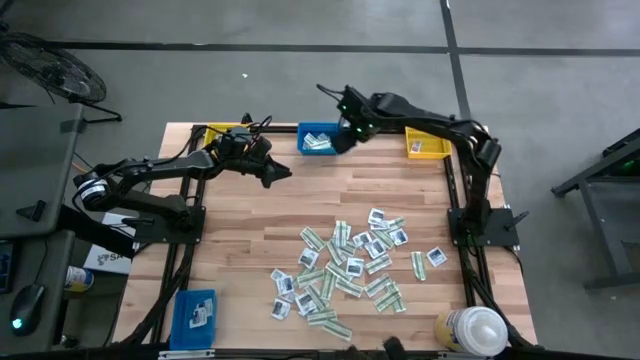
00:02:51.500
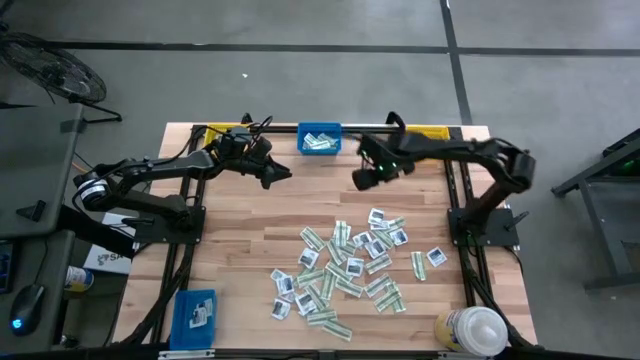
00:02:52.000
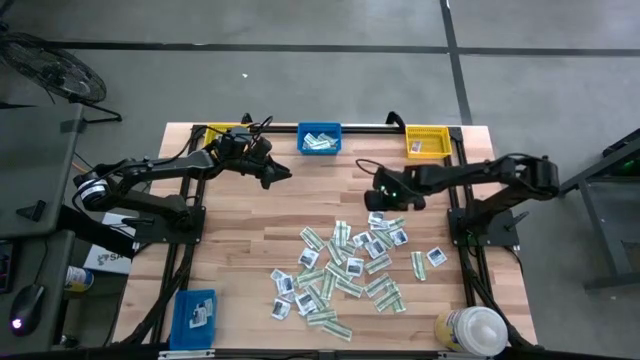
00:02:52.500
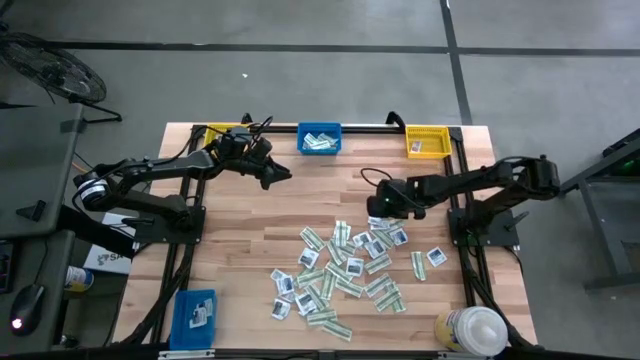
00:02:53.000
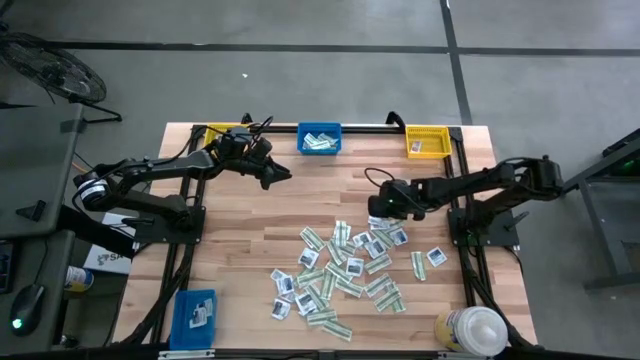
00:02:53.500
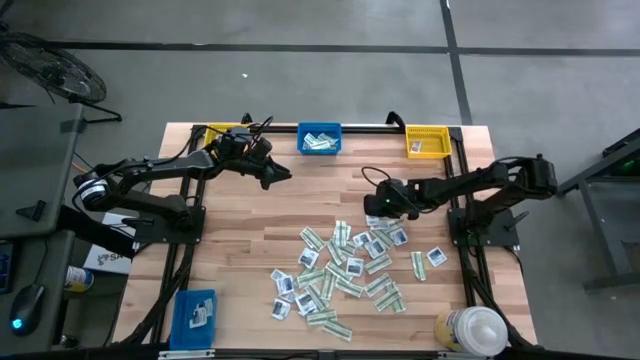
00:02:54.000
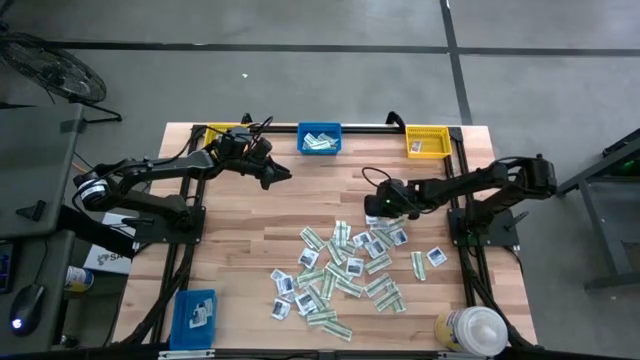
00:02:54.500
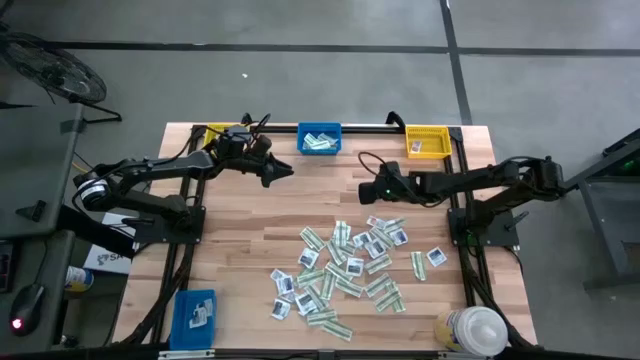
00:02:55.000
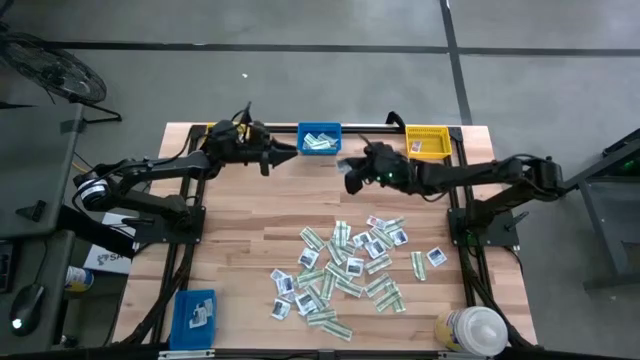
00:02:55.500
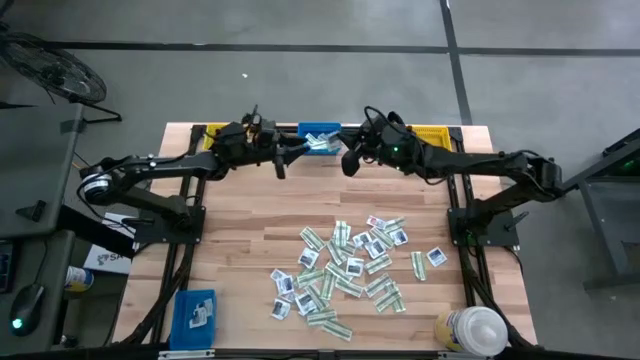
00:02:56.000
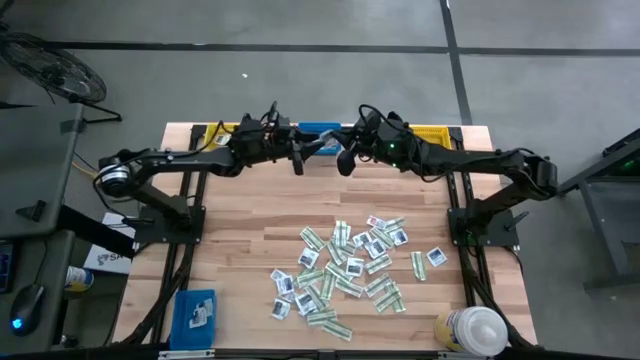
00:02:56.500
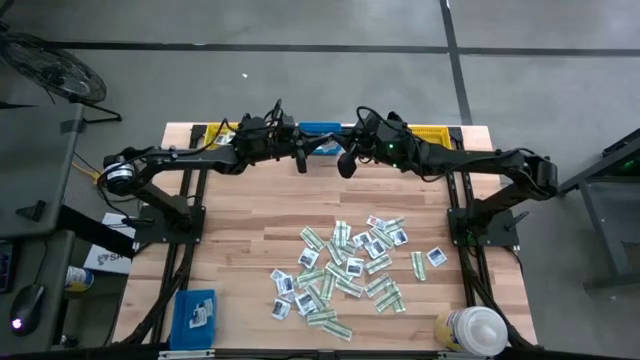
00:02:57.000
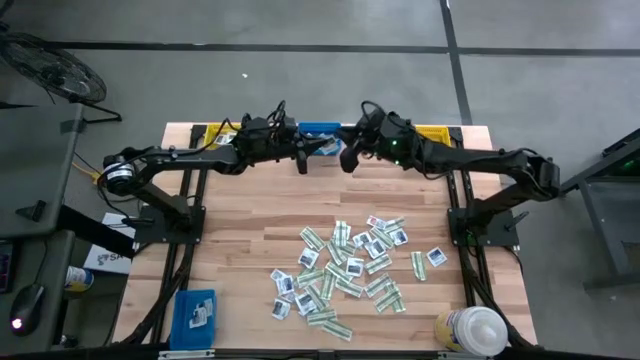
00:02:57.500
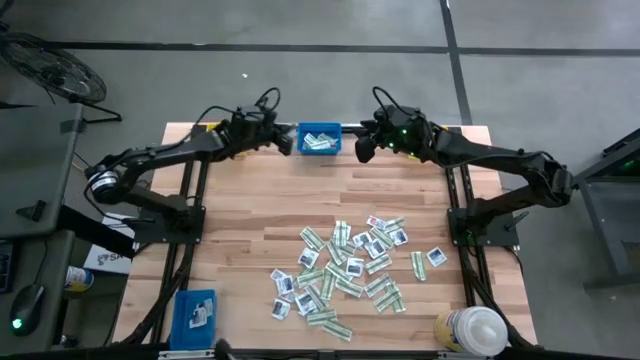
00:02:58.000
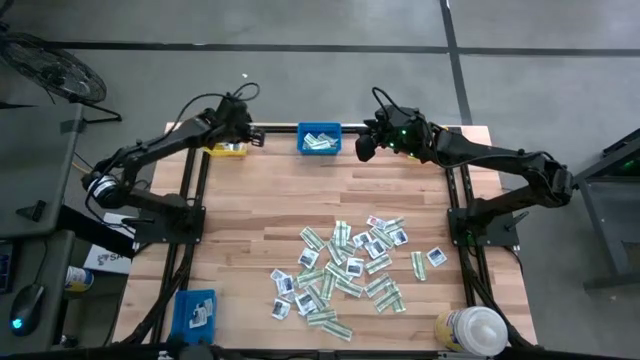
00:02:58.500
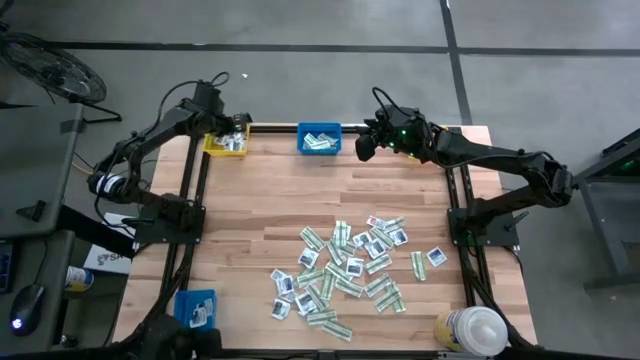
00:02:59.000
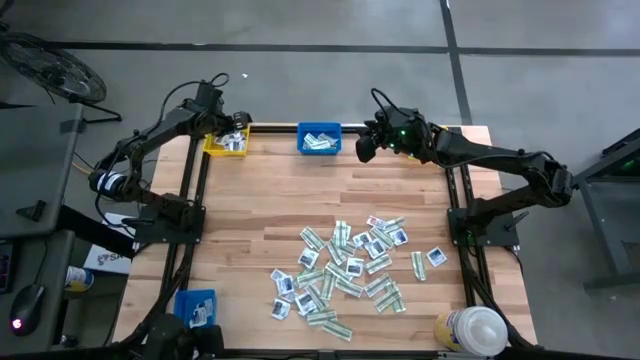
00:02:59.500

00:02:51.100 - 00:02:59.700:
Task: Pick & Place First Aid Supplies
Put the gray towelette pack into the left yellow bin

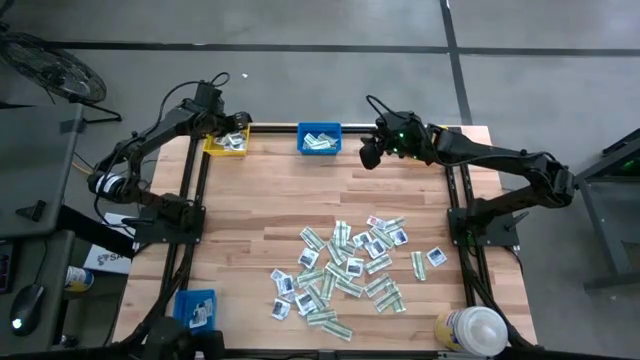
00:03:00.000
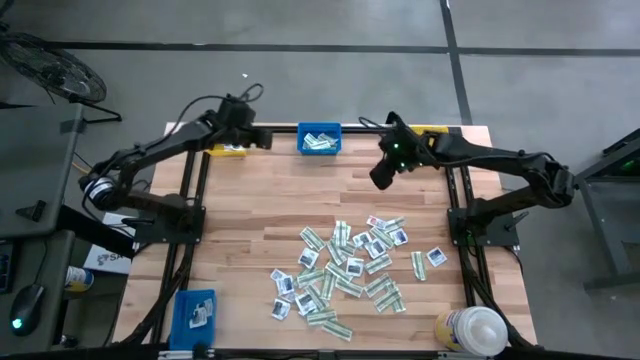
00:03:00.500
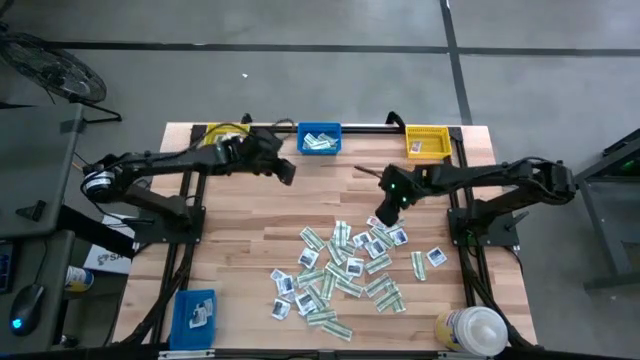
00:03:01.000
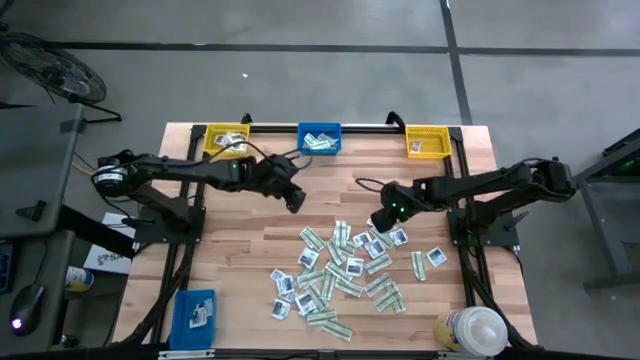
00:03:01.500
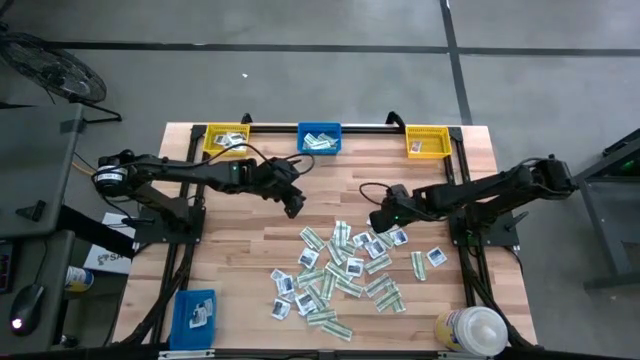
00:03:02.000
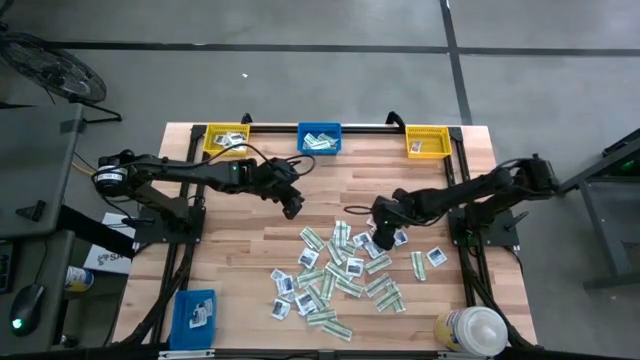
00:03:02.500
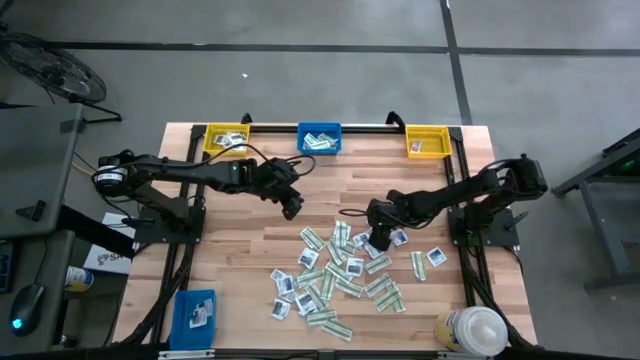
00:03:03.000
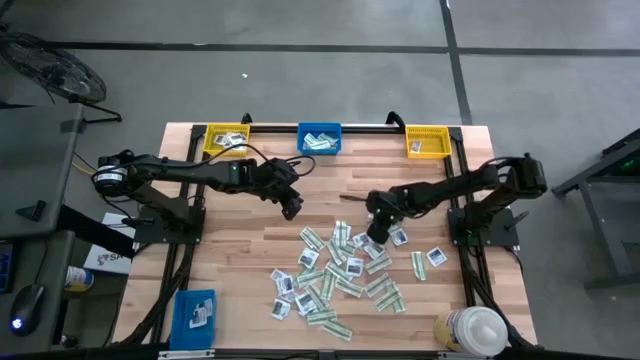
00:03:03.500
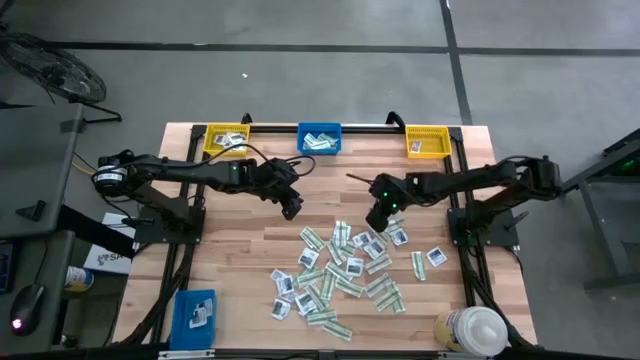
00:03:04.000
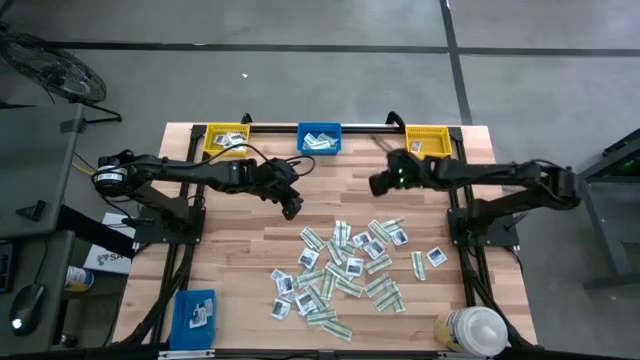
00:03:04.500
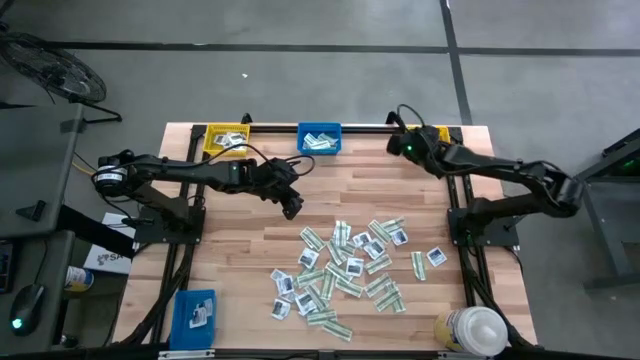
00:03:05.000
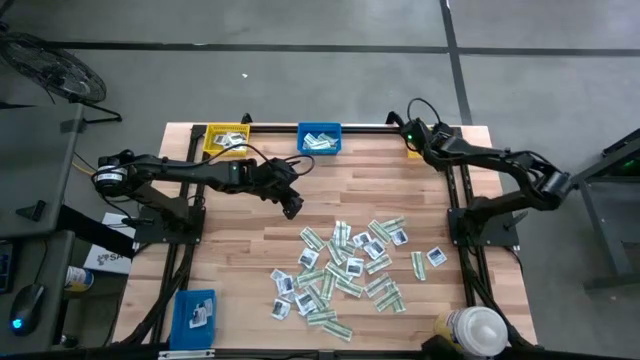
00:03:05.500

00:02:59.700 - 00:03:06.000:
Put the orange ointment pack into the right yellow bin

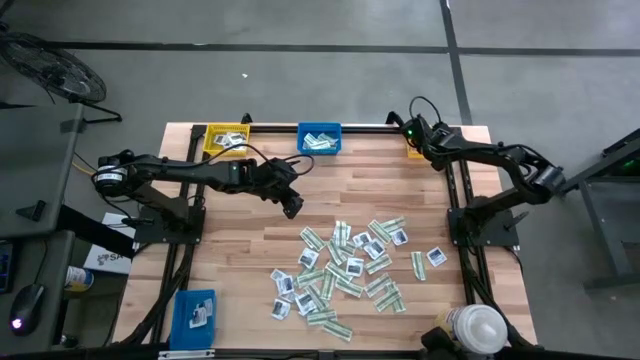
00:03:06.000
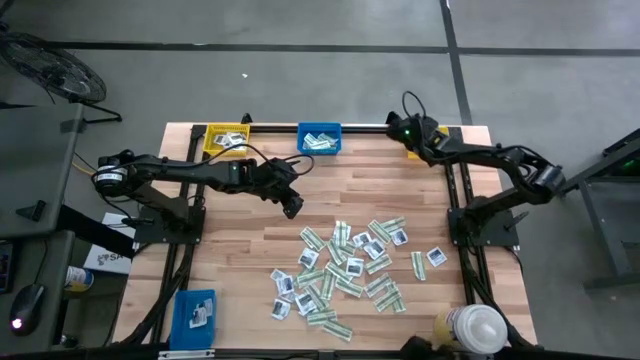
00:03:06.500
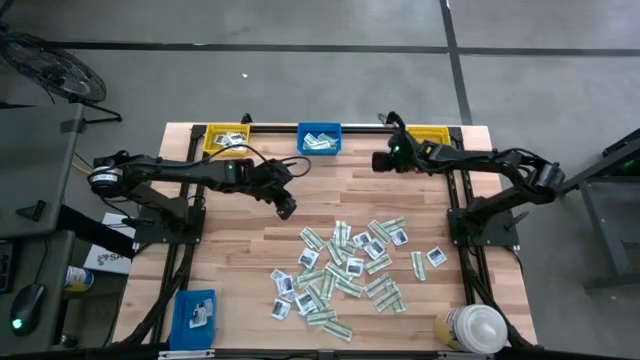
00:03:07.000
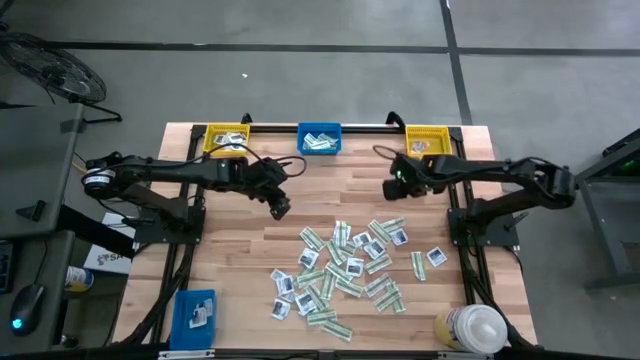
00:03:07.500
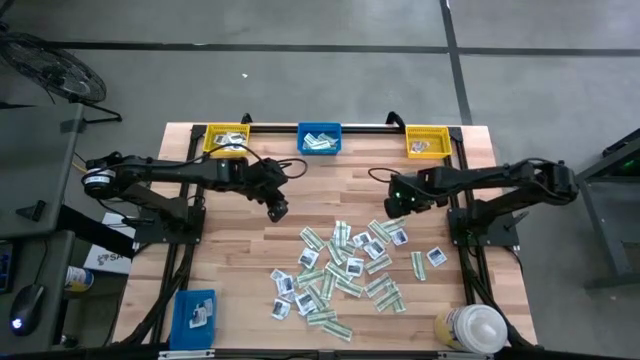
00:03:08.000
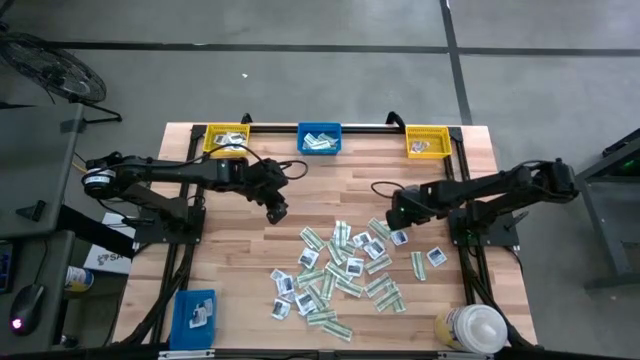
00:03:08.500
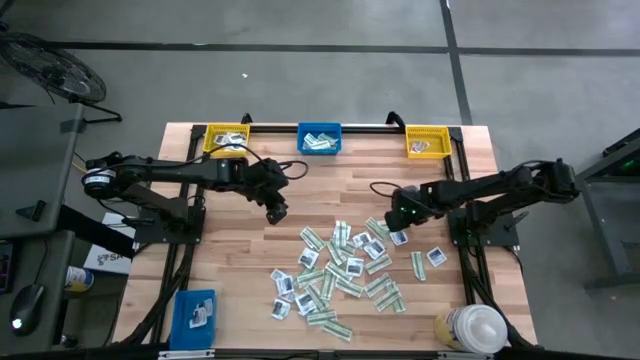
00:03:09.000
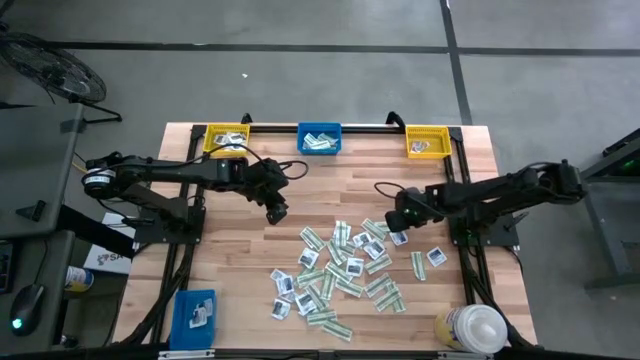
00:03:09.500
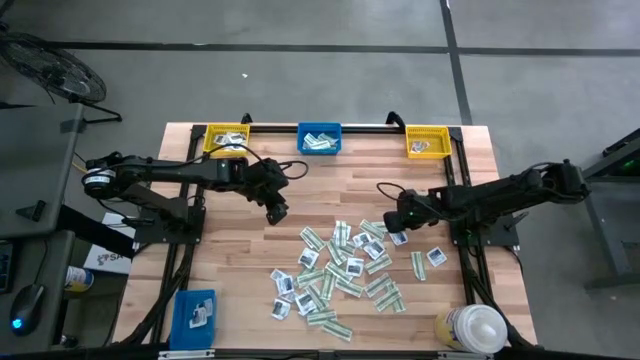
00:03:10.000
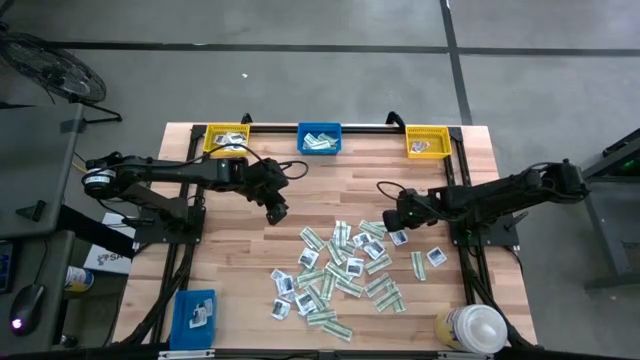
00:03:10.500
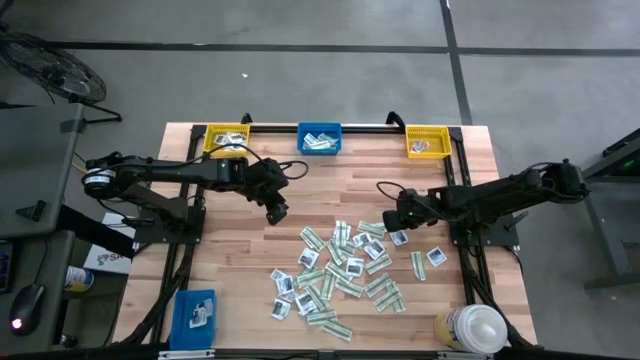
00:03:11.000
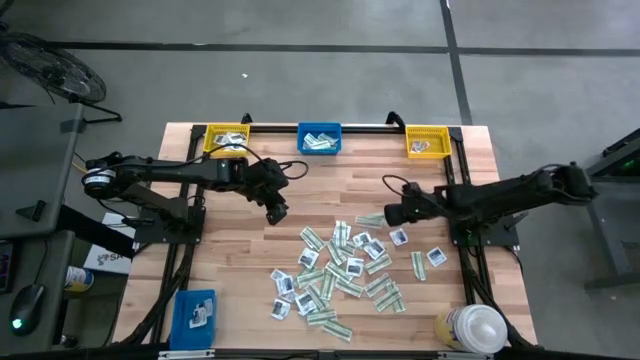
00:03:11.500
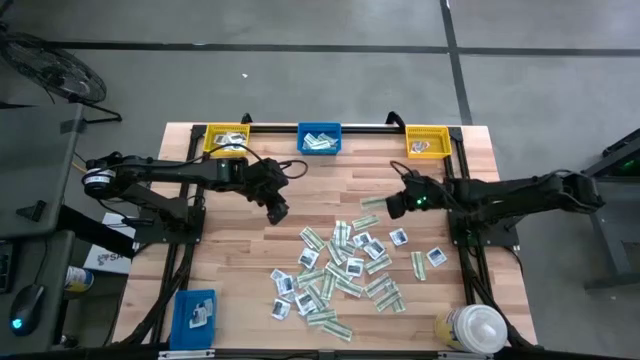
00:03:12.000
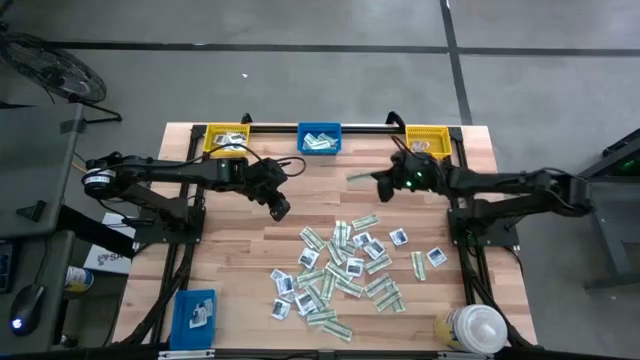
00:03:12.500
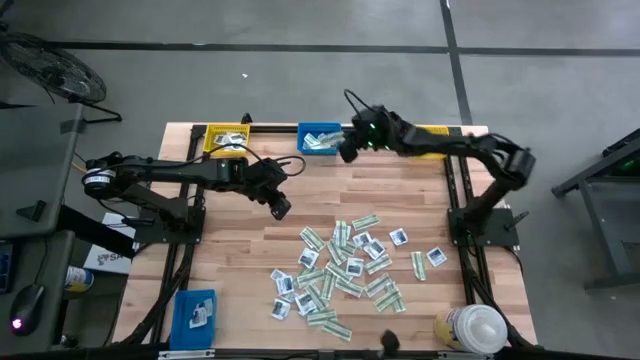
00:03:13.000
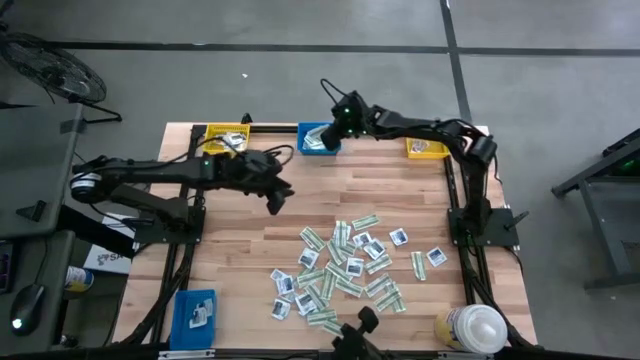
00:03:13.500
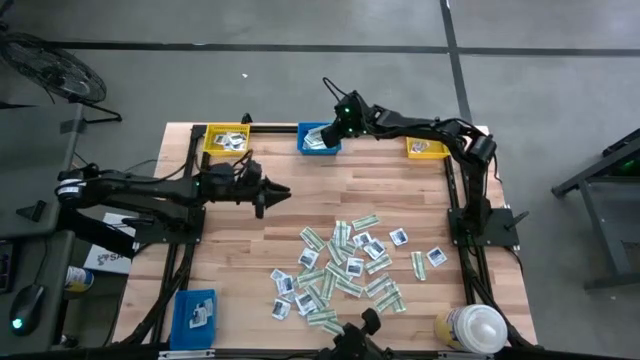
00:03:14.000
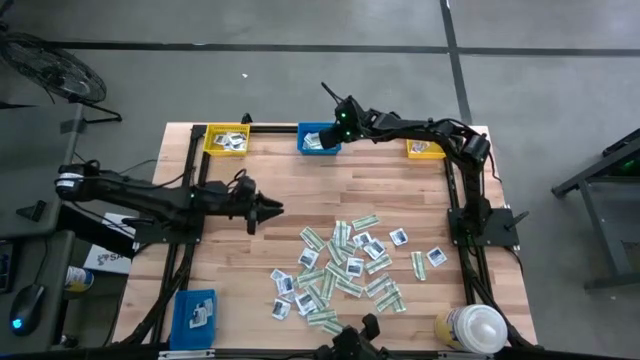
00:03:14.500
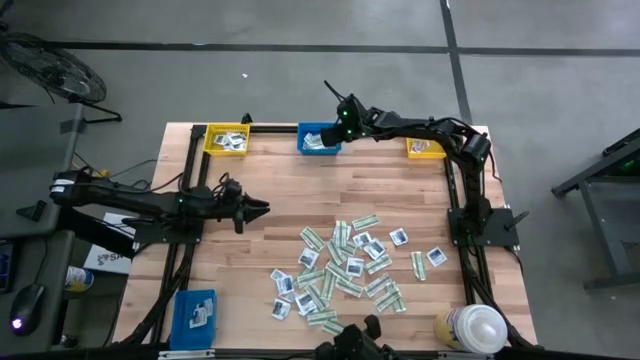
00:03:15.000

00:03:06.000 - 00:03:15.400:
Put the green bandage pack into the top blue bin
